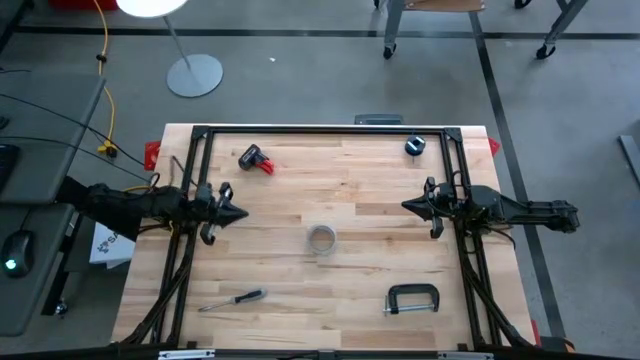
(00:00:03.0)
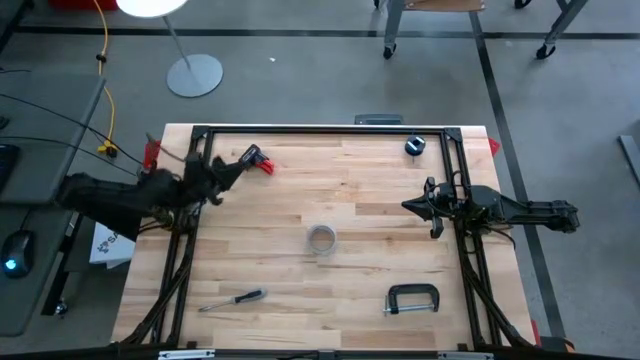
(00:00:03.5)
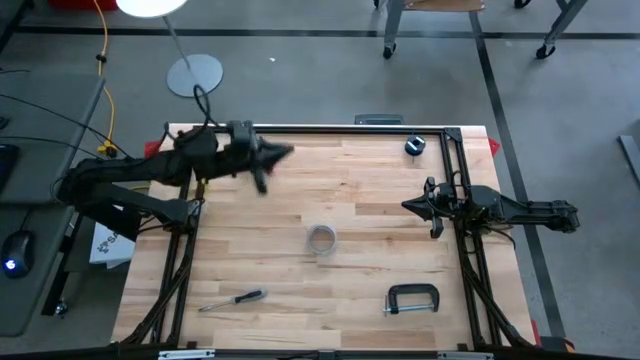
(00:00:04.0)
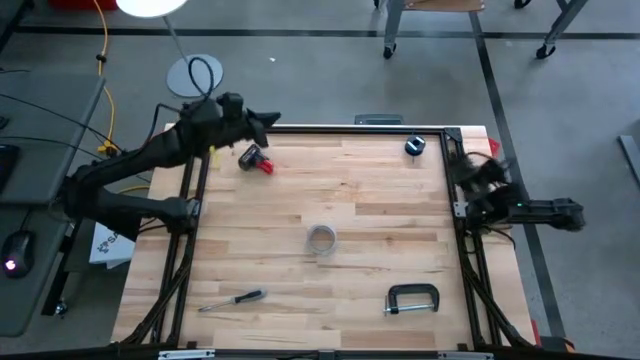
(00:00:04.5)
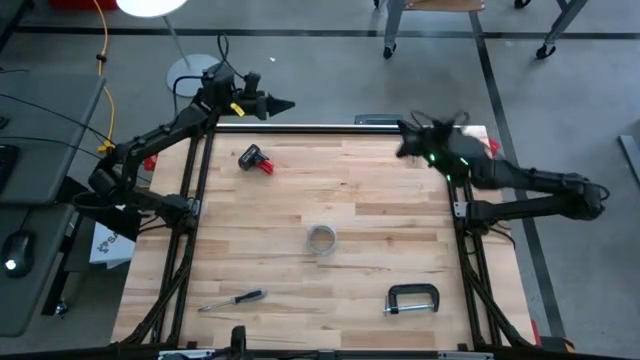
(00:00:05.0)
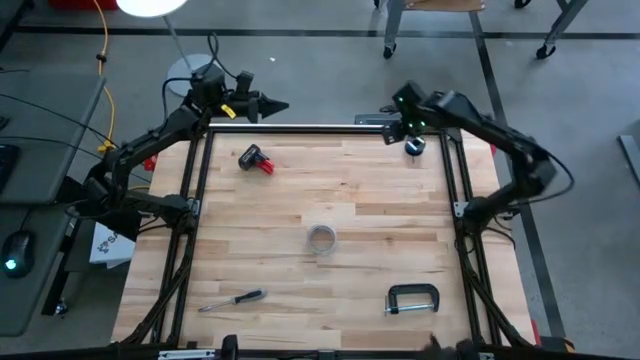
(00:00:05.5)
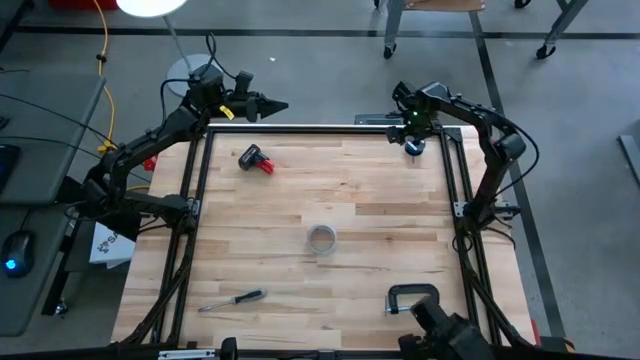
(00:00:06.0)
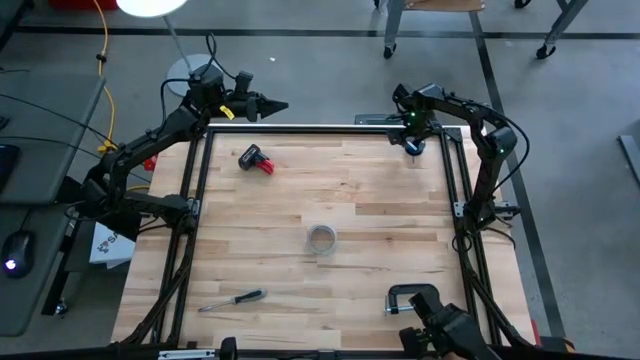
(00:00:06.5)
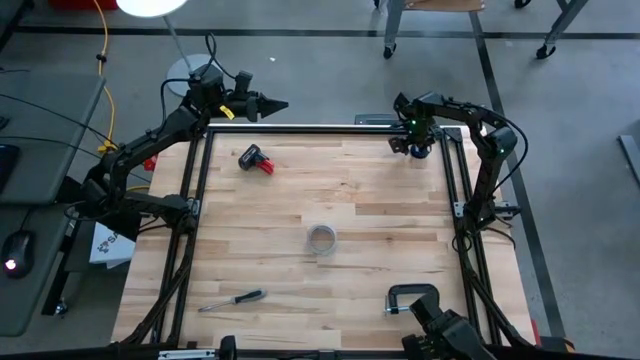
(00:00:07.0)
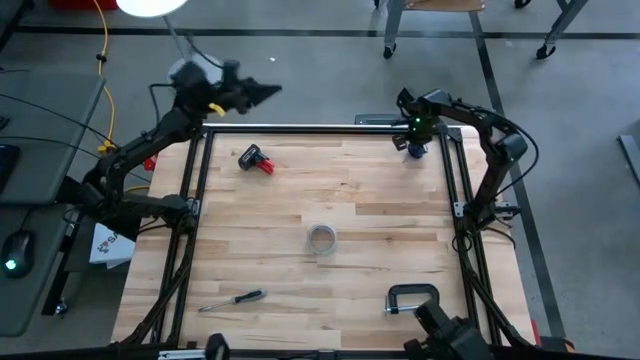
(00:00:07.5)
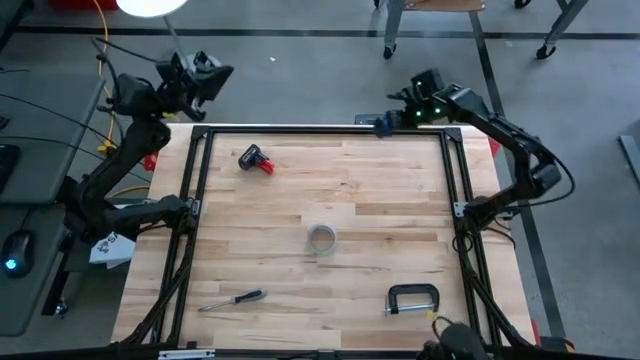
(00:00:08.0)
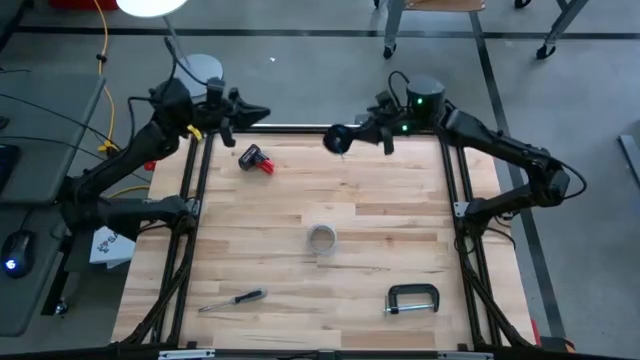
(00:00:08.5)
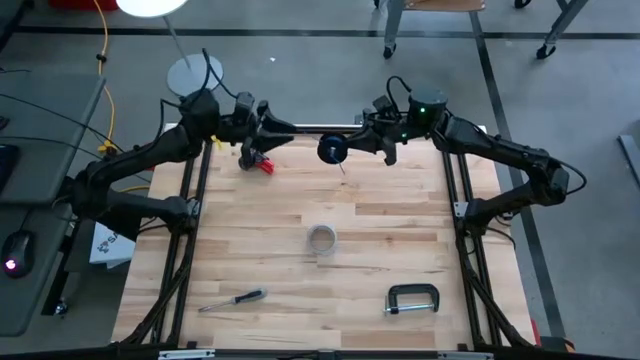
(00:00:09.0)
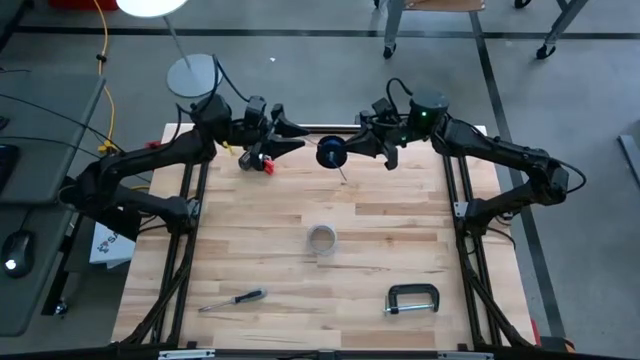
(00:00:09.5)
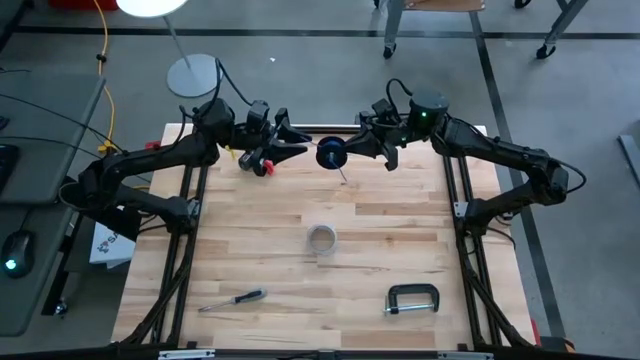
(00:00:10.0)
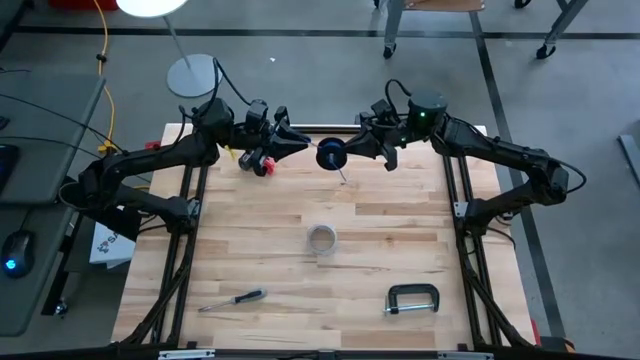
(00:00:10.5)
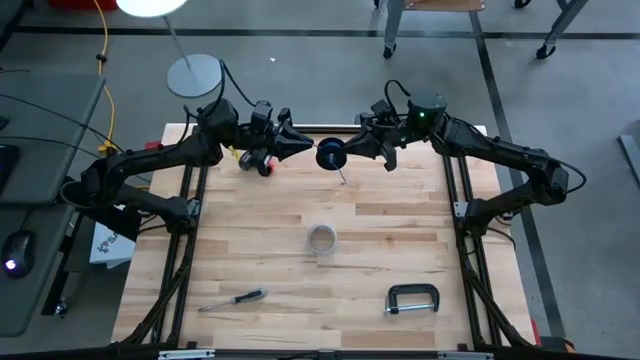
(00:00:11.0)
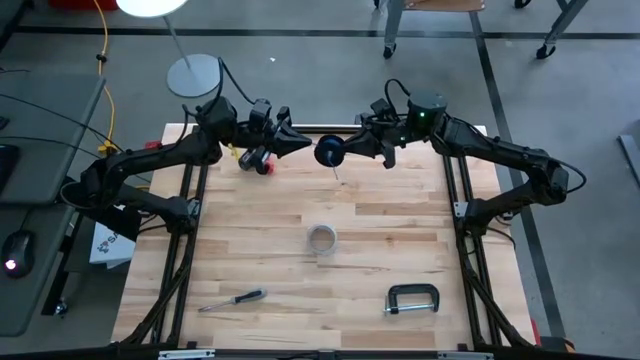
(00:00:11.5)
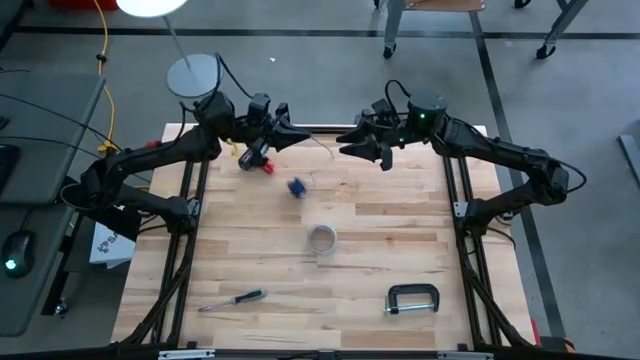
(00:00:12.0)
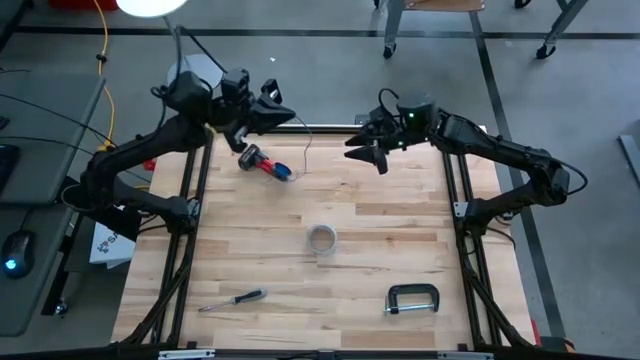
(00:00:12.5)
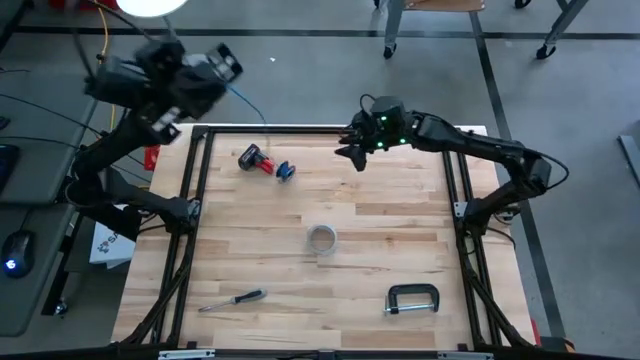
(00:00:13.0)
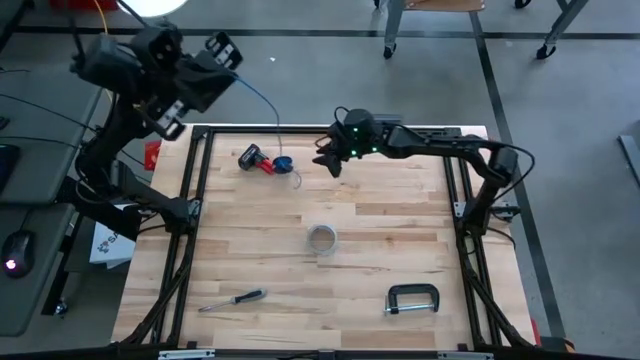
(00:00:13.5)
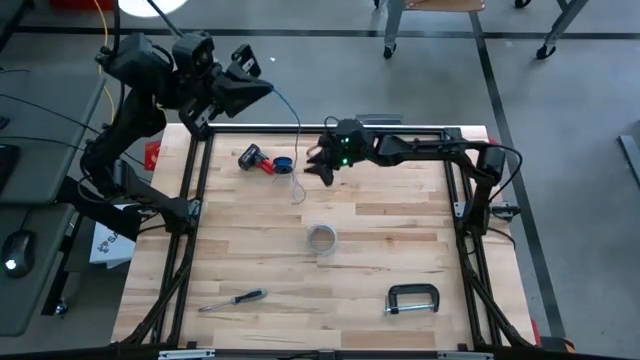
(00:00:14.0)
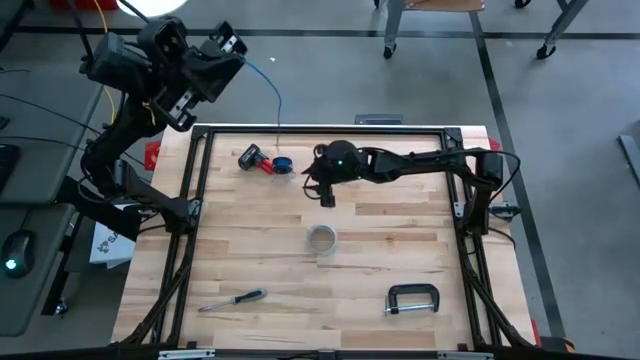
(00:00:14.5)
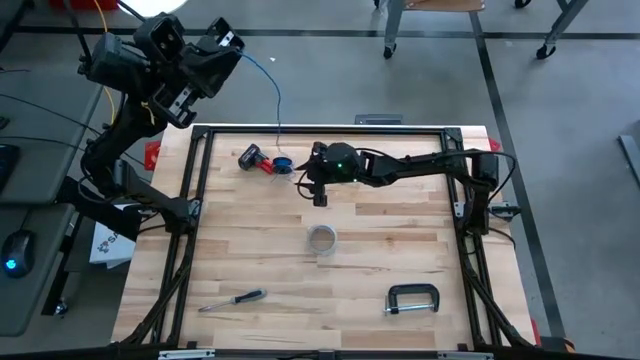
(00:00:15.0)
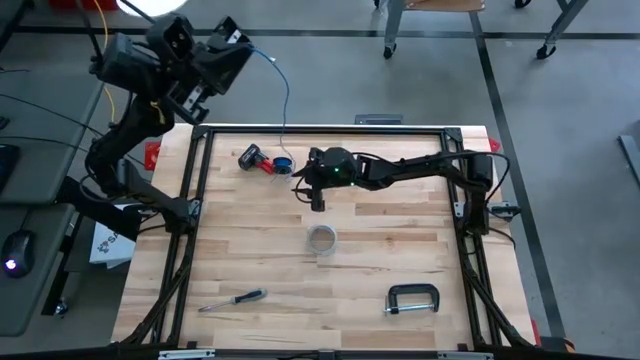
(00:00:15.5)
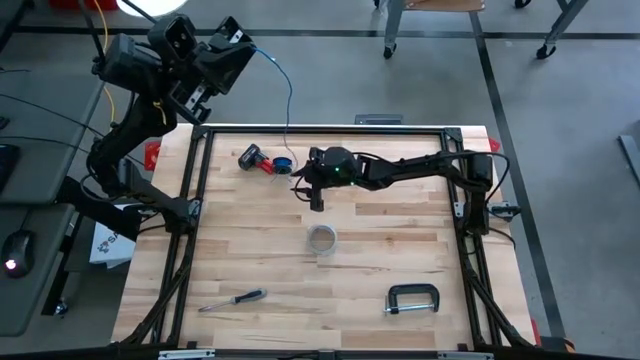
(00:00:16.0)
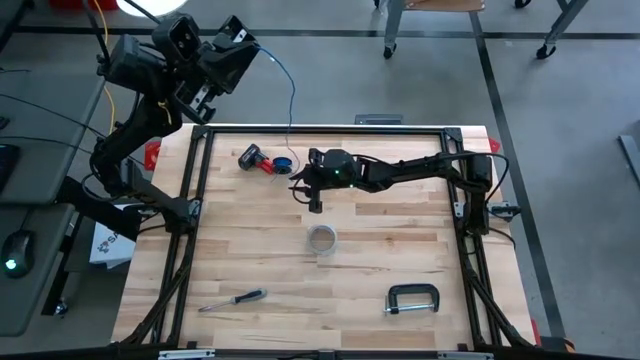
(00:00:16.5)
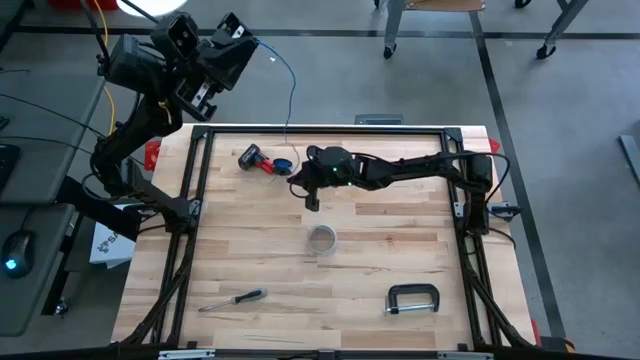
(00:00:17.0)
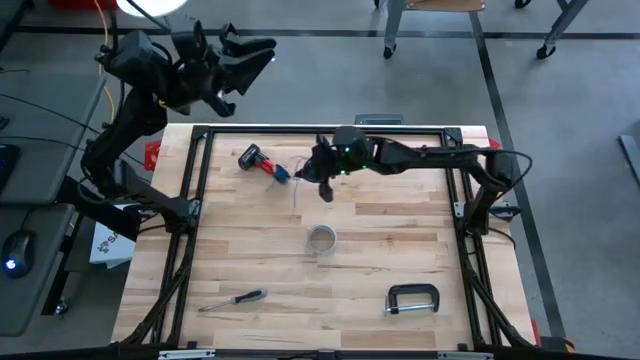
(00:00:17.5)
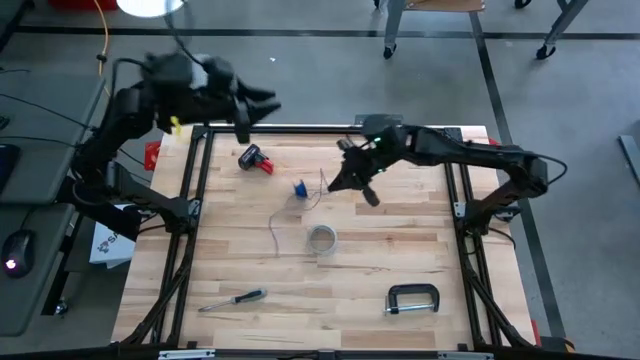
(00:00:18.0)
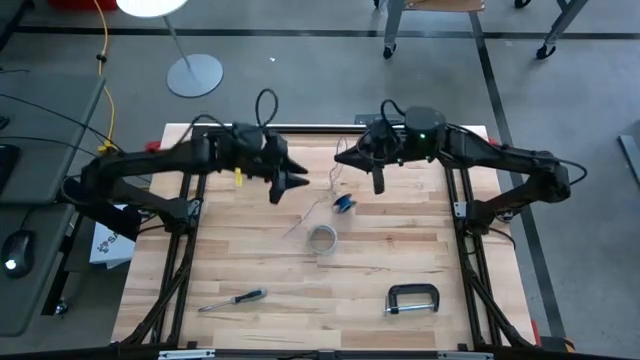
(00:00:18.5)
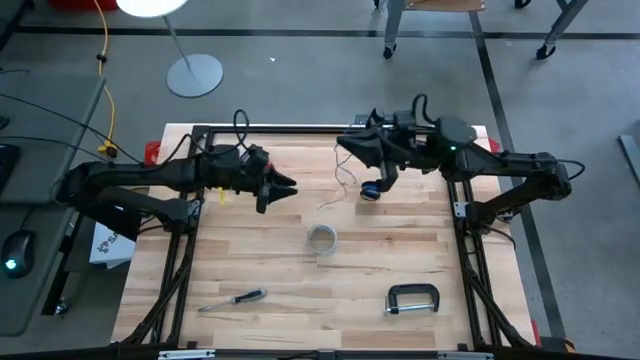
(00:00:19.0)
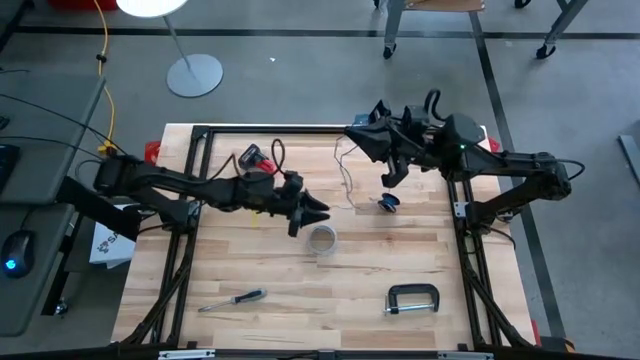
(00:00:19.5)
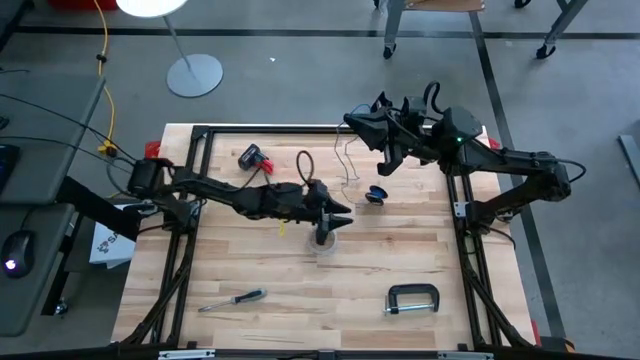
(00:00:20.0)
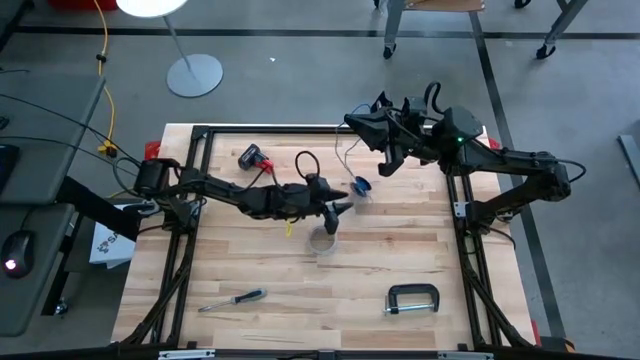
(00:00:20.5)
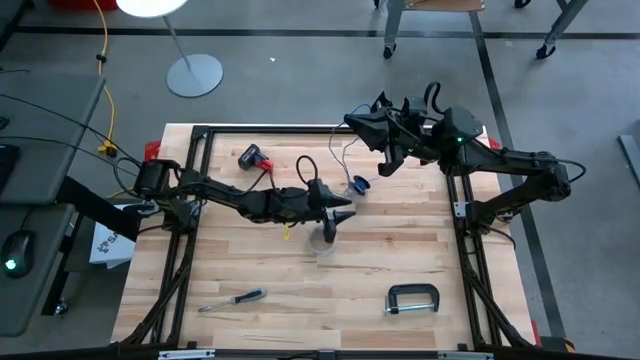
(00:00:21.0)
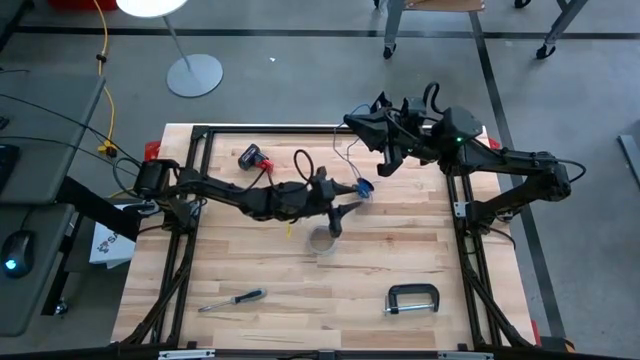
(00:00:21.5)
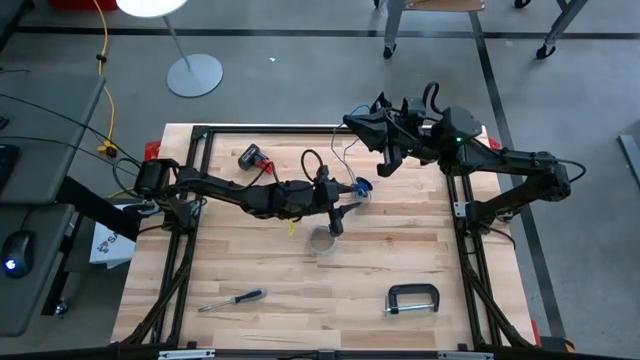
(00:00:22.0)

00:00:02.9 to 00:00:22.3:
Task: Coil cords
Uncoil the blue wire from the spool
